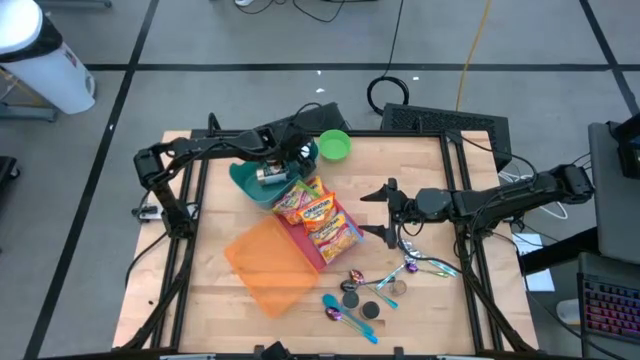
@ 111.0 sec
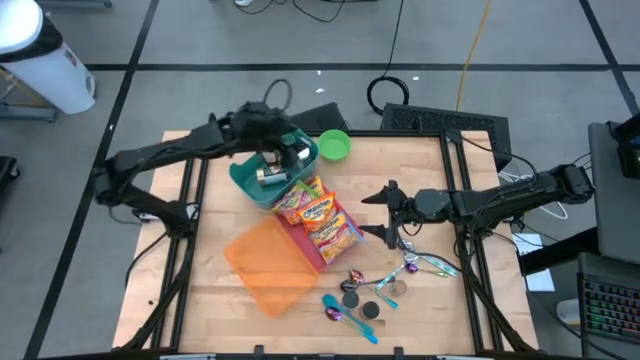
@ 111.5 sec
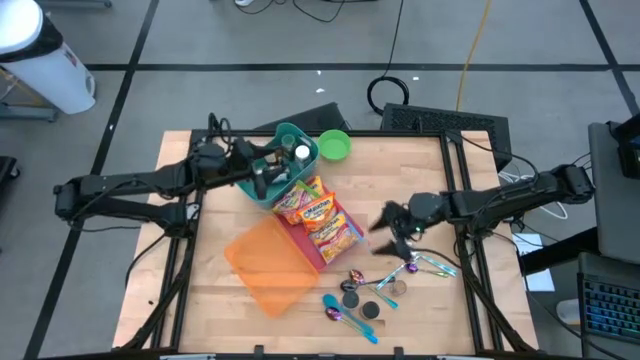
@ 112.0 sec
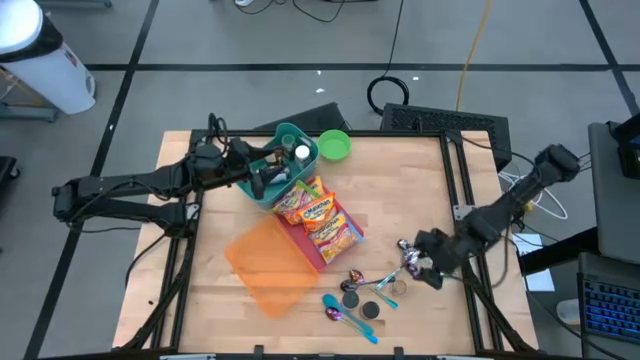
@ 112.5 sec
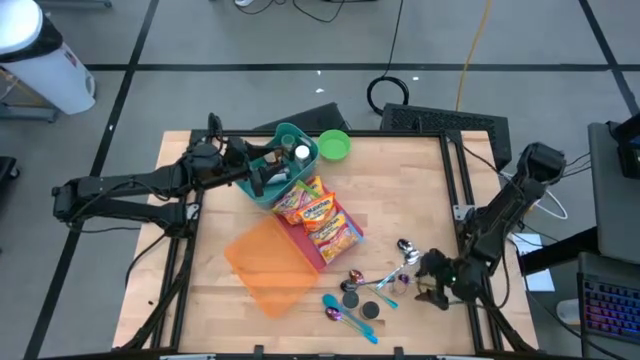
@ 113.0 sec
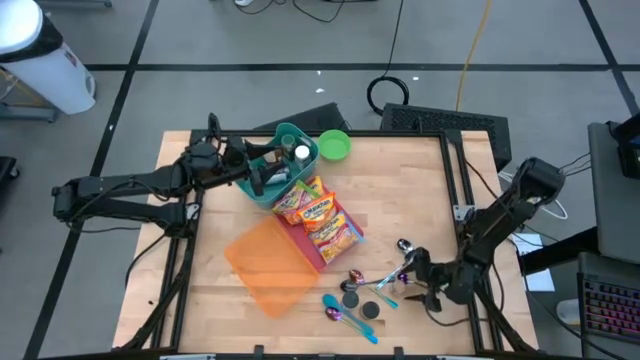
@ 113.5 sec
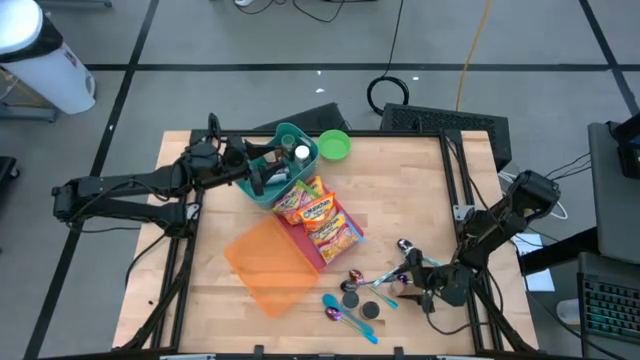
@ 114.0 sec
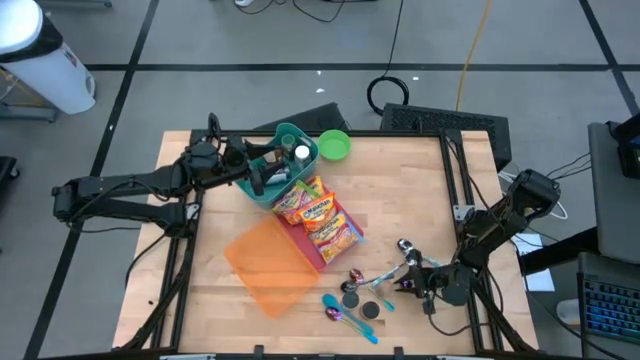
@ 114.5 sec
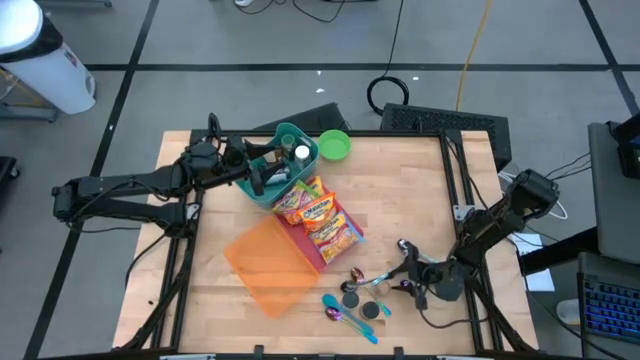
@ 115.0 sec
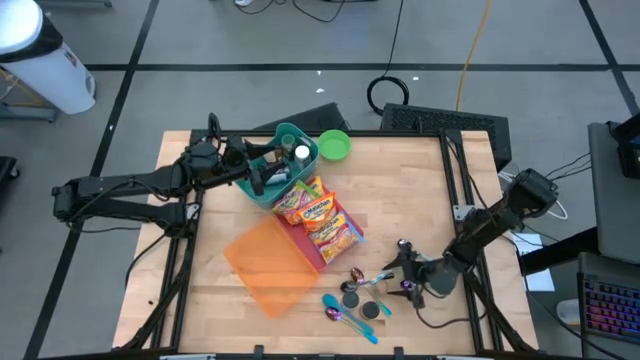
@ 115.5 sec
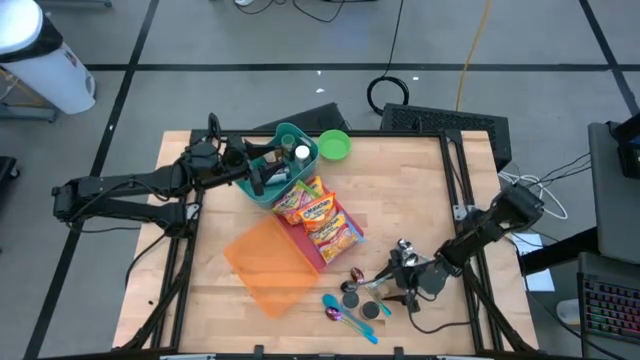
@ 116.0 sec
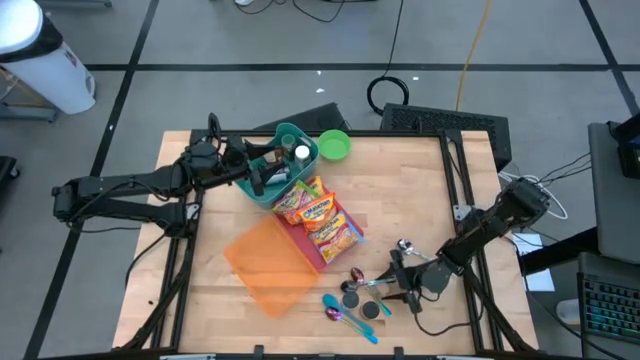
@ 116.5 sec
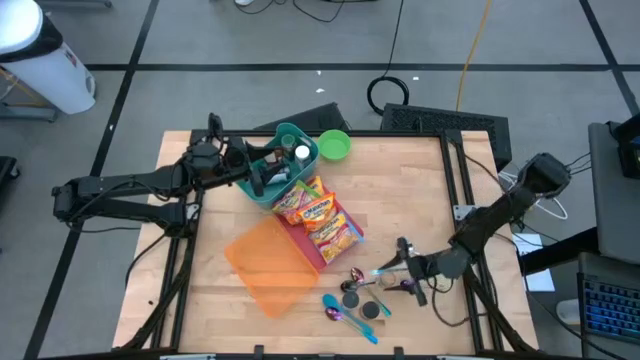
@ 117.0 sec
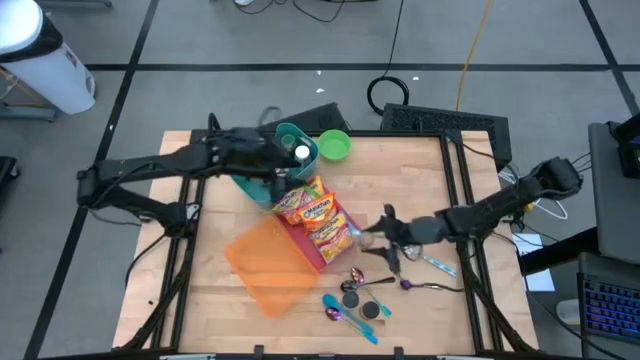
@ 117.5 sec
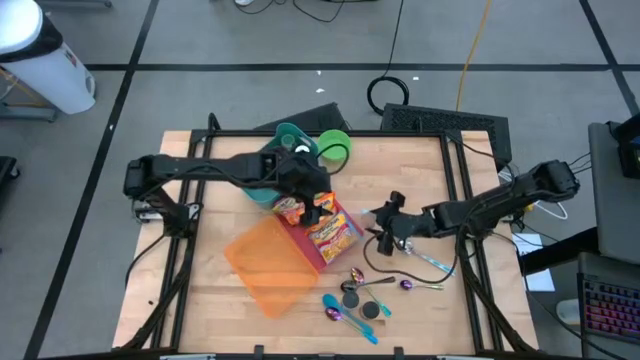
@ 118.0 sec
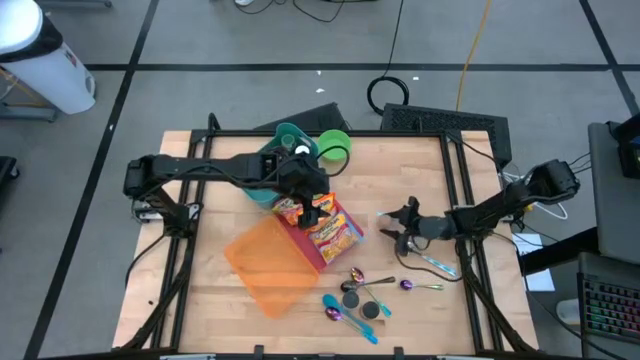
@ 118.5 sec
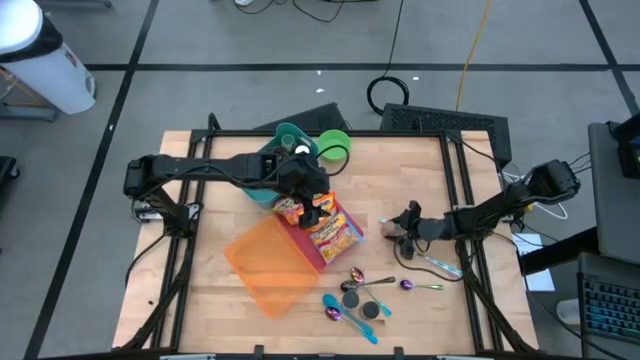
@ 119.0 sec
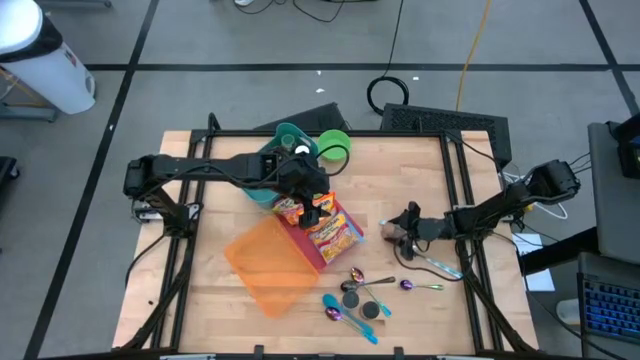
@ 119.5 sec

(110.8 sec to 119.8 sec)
Task: Pick & Place Food Item
Put the brown seasoning bottle into the green bin

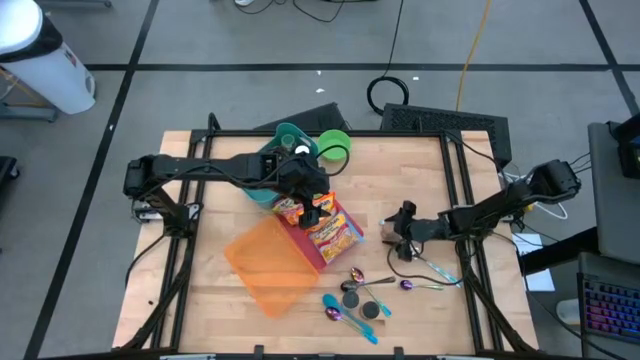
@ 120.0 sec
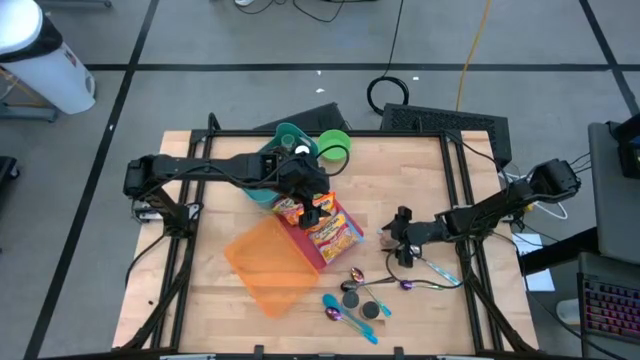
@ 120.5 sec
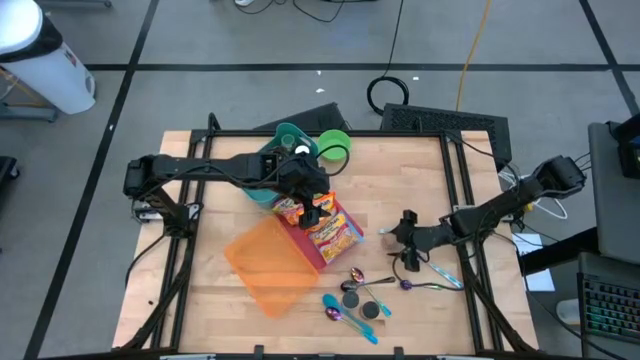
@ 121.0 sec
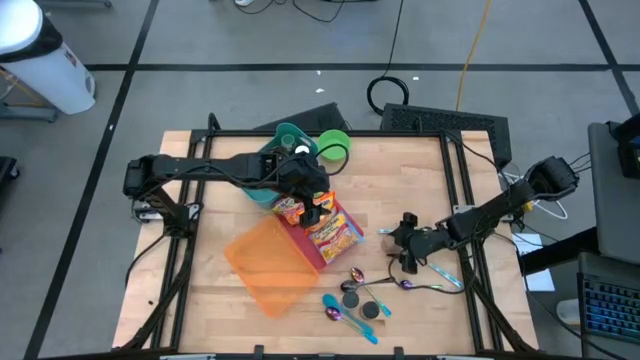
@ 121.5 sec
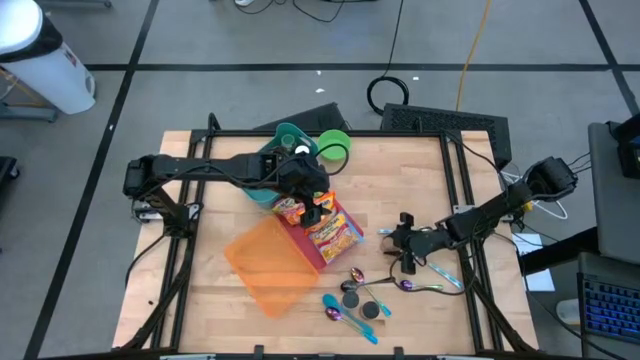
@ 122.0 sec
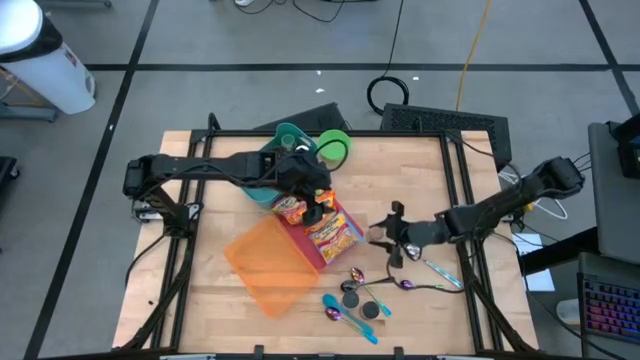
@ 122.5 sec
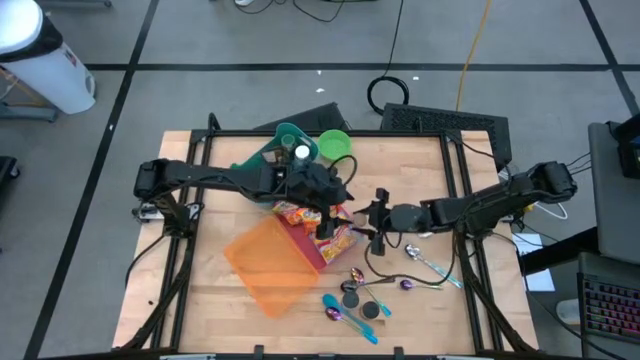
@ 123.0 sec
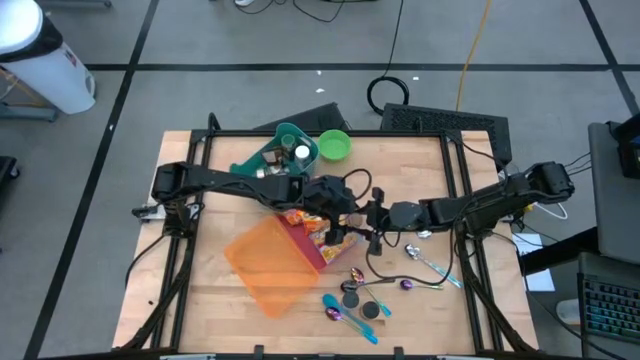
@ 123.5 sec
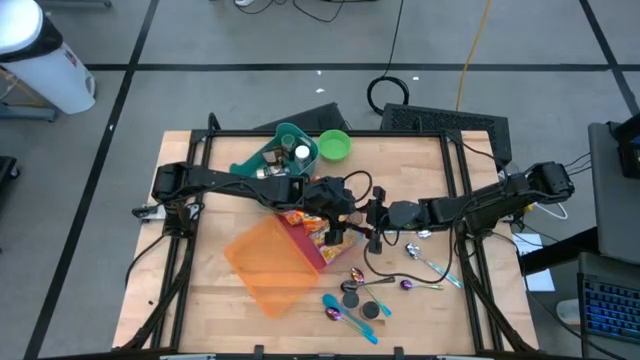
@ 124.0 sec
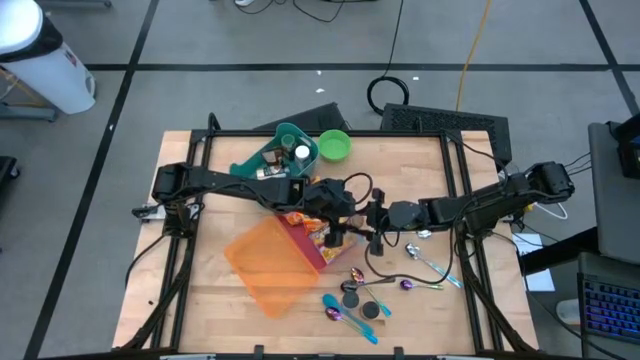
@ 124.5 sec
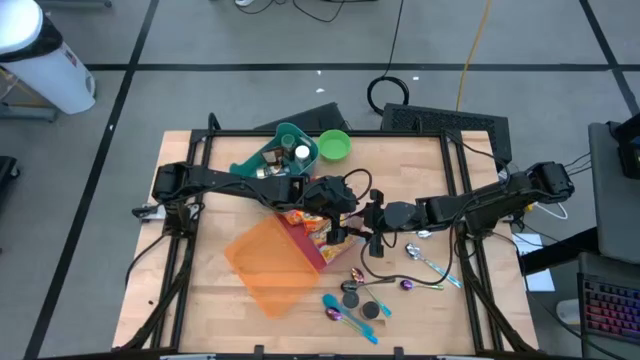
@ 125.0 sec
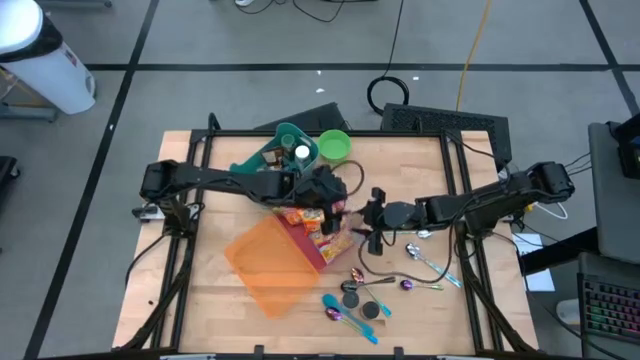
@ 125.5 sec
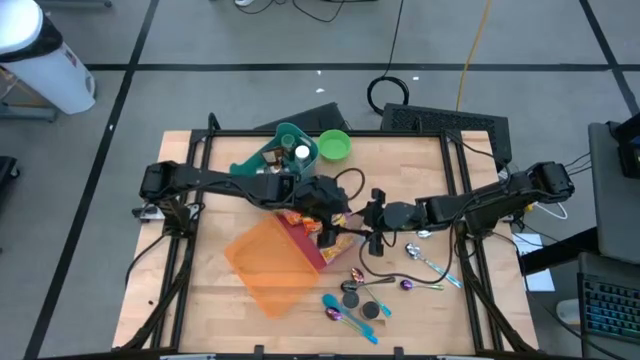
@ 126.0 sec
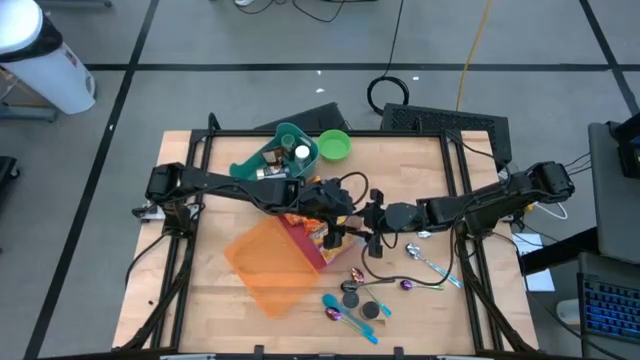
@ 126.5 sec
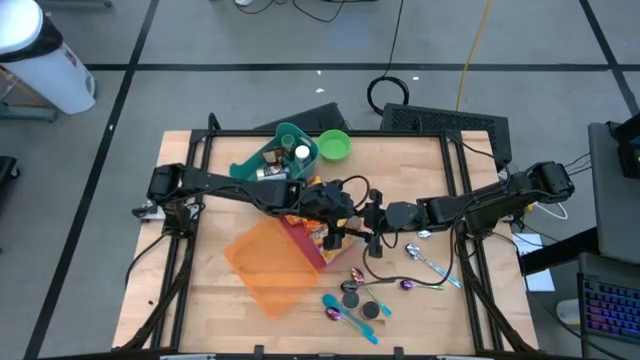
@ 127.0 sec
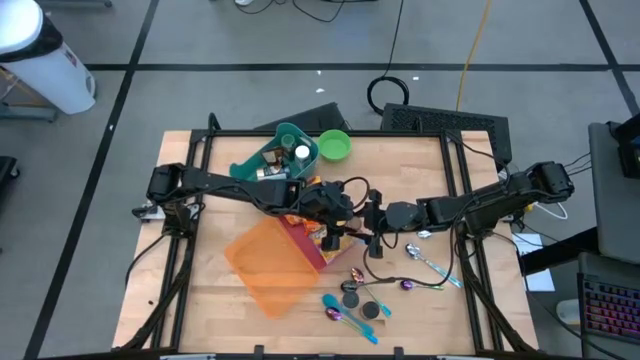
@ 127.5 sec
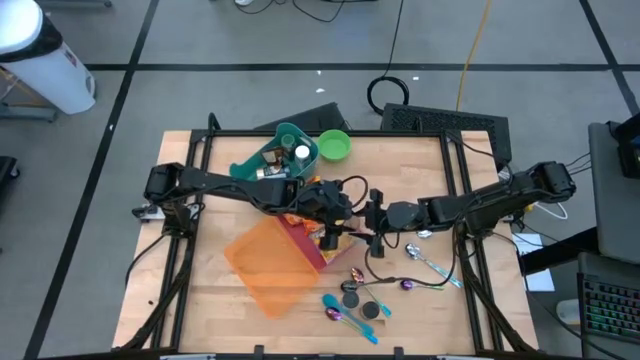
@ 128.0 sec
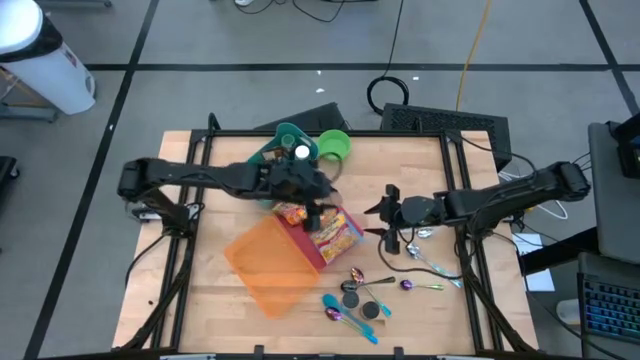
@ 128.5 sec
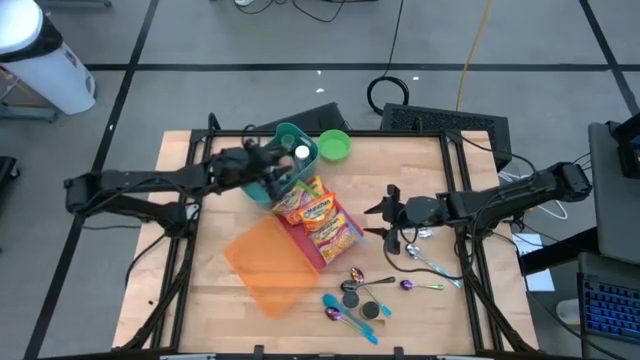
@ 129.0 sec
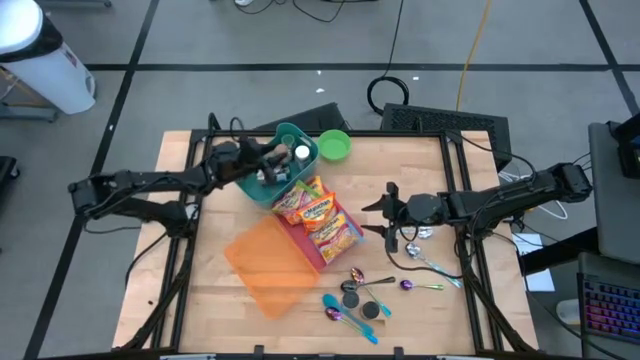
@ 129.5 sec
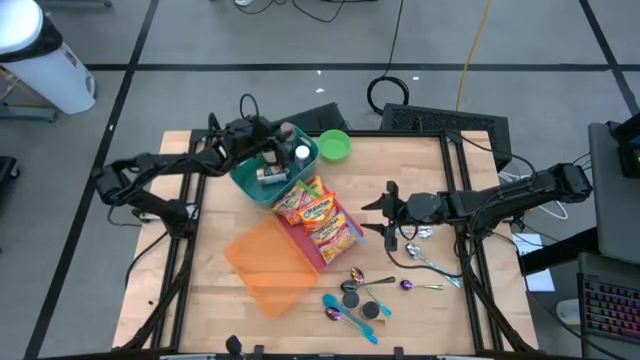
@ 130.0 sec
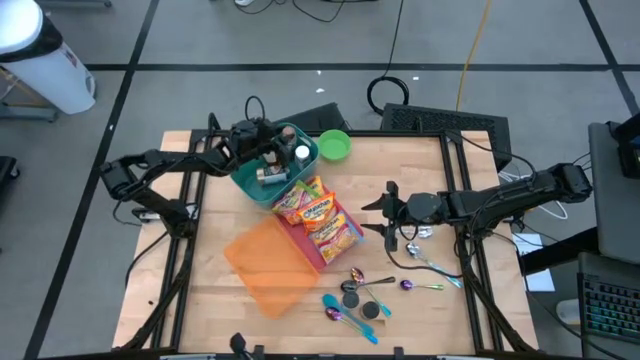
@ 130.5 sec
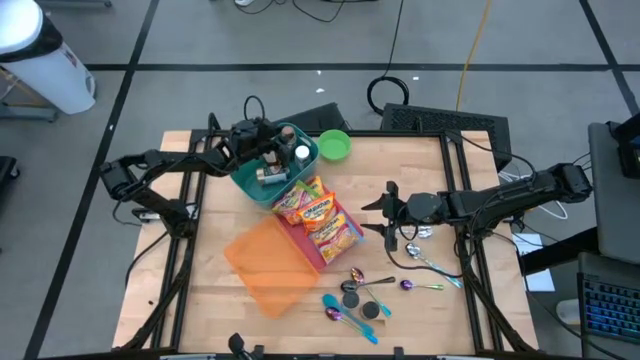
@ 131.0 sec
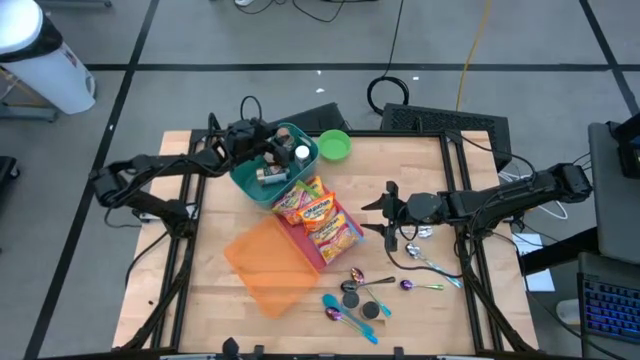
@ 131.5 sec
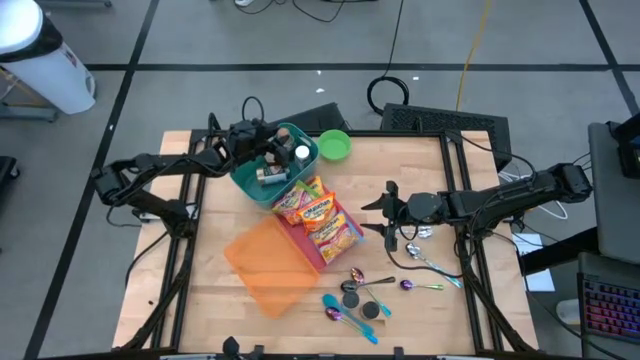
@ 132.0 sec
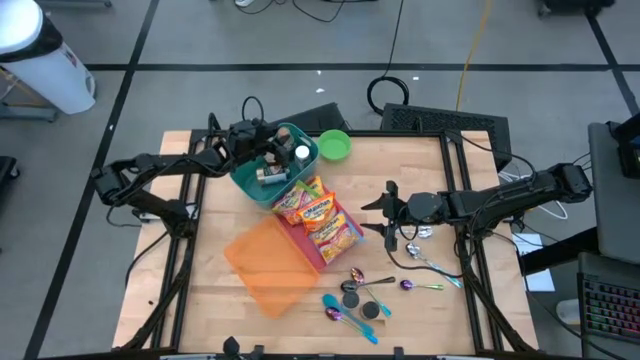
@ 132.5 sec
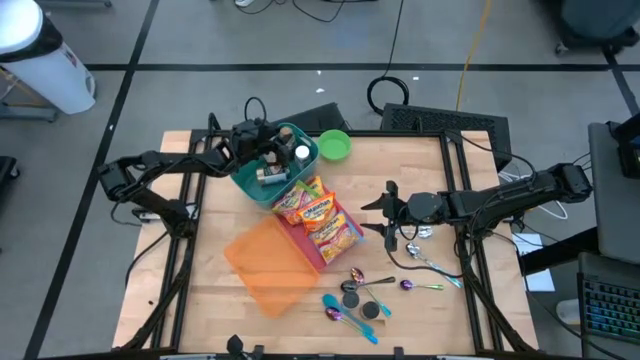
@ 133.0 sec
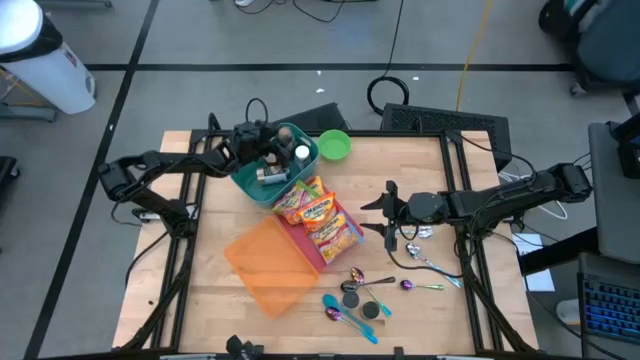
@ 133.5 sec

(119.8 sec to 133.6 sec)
Put the brown seasoning bottle into the green bin
